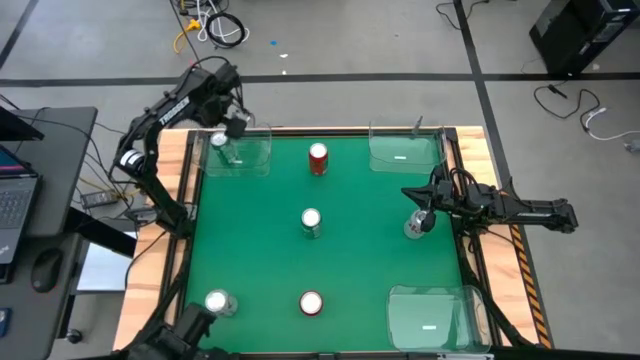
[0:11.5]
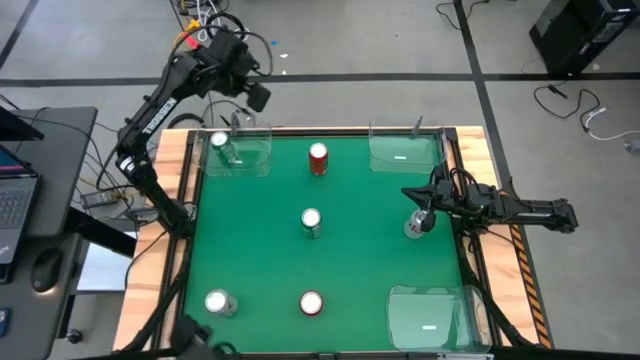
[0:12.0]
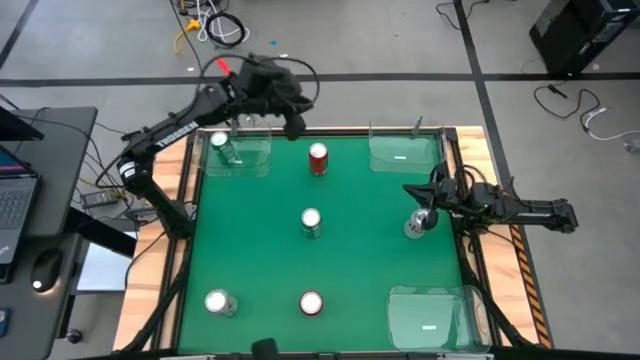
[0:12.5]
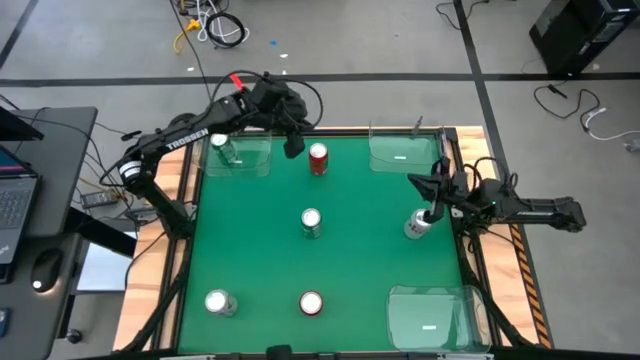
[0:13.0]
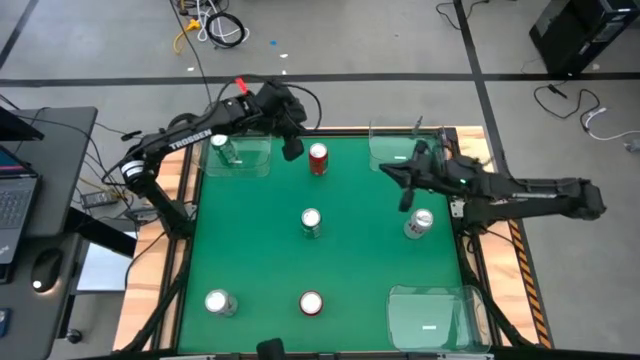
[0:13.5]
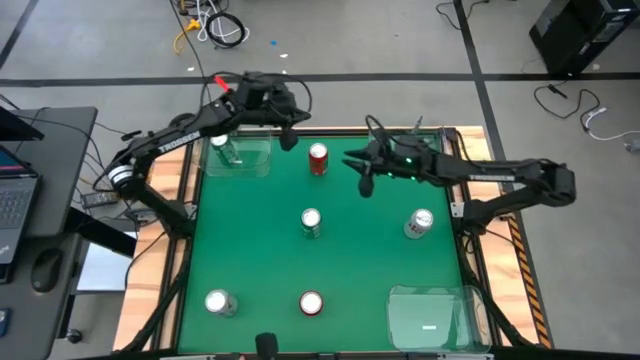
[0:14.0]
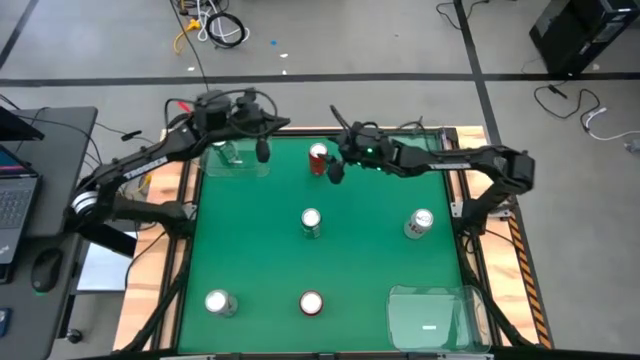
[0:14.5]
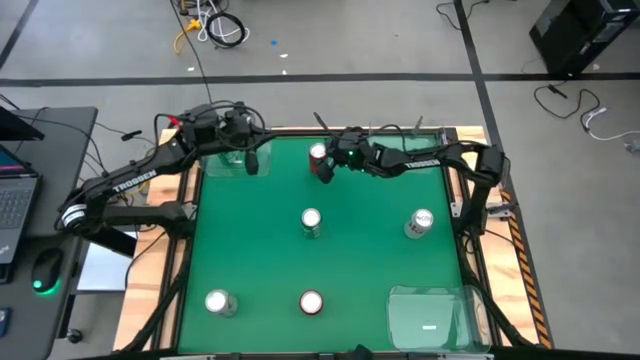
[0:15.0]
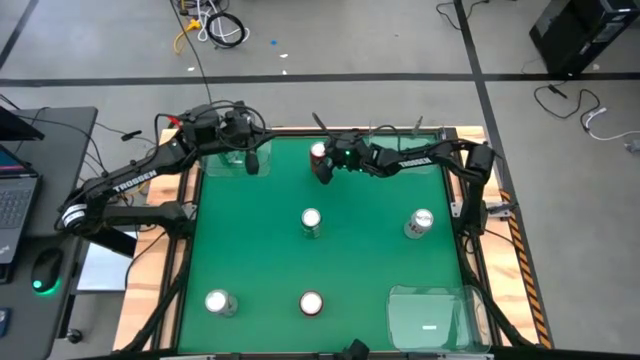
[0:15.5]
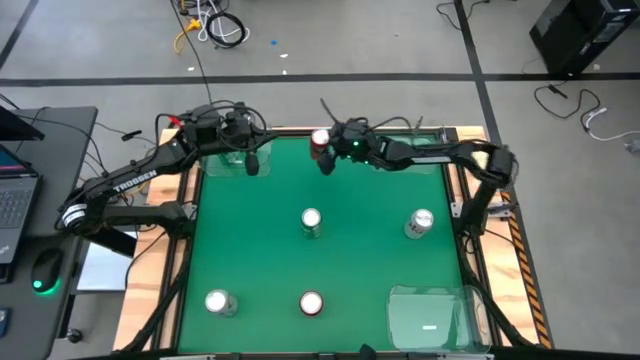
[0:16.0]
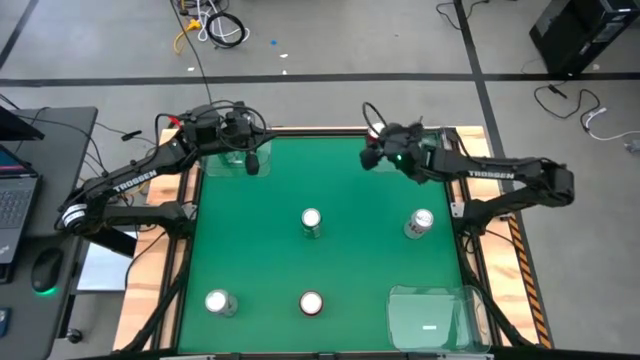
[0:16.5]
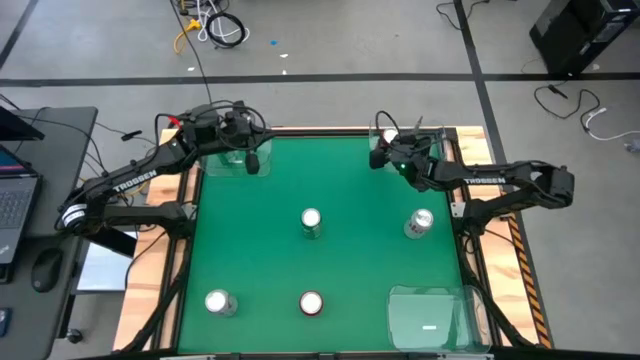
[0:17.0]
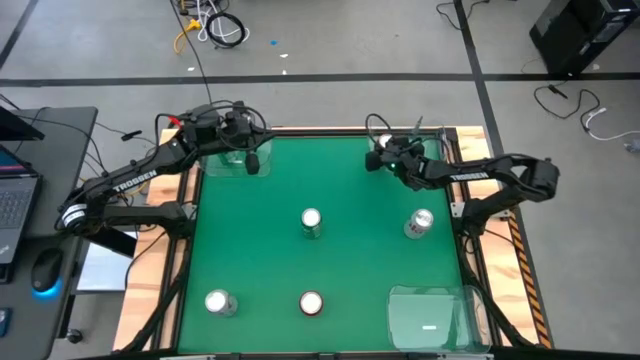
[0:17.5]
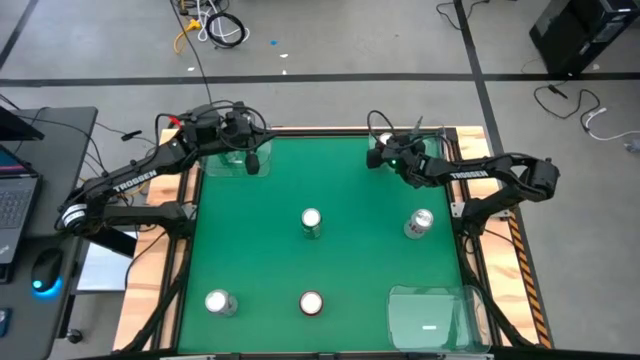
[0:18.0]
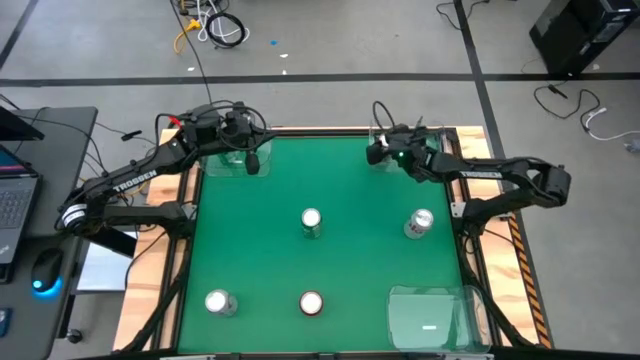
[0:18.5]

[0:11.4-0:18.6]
Task: Sort soda cans
Put the top red-black soda can into the top right transparent bin

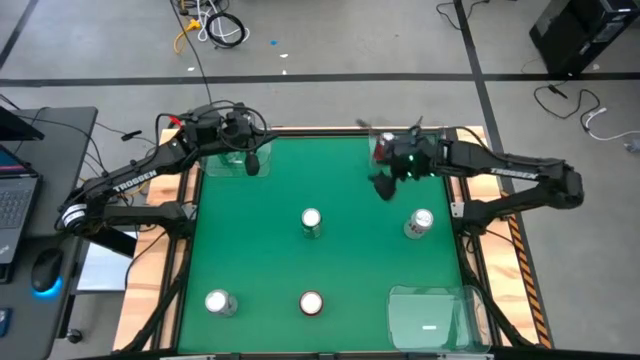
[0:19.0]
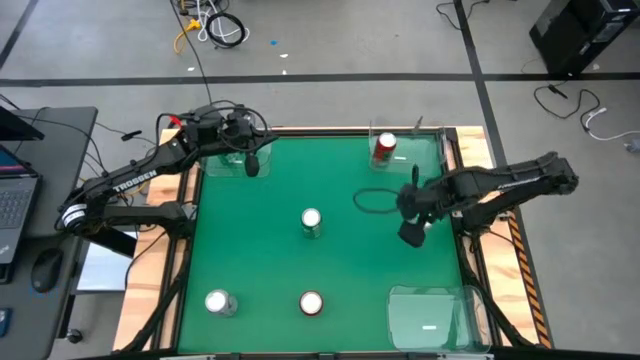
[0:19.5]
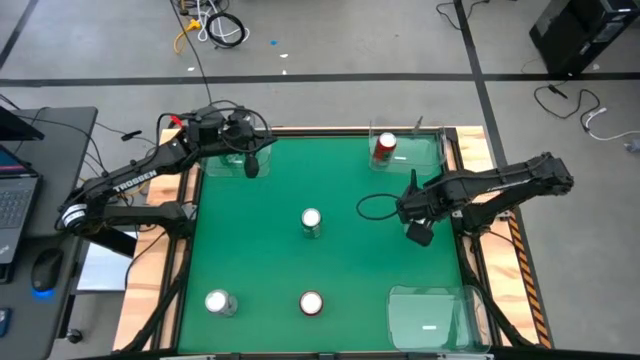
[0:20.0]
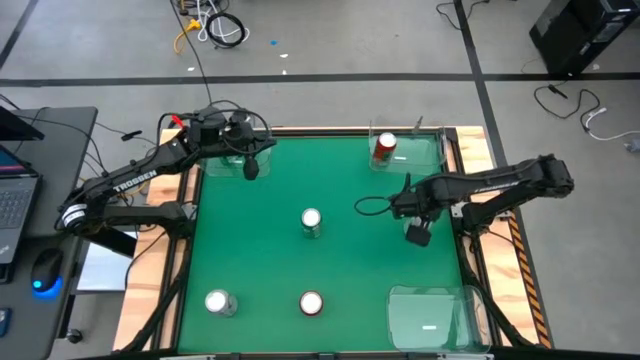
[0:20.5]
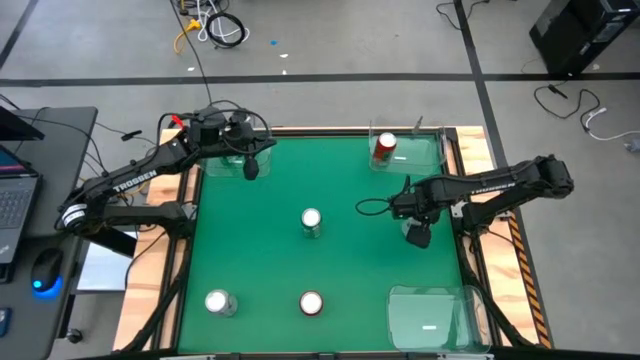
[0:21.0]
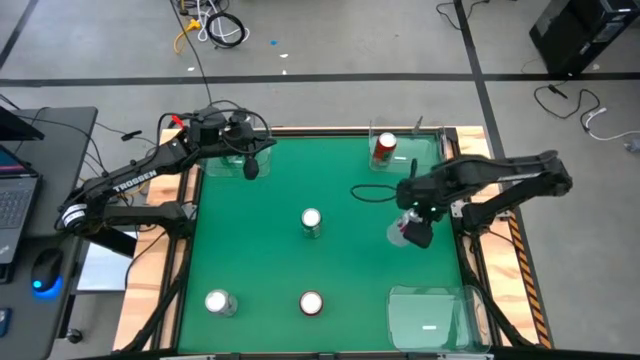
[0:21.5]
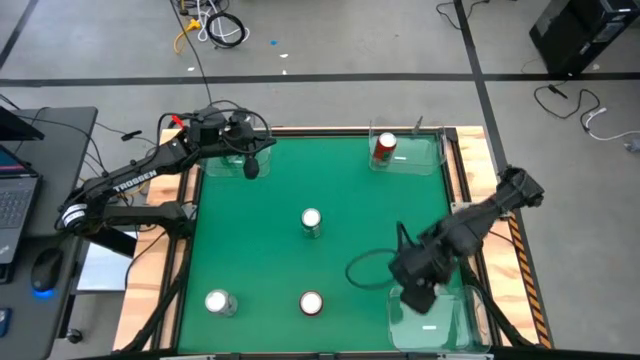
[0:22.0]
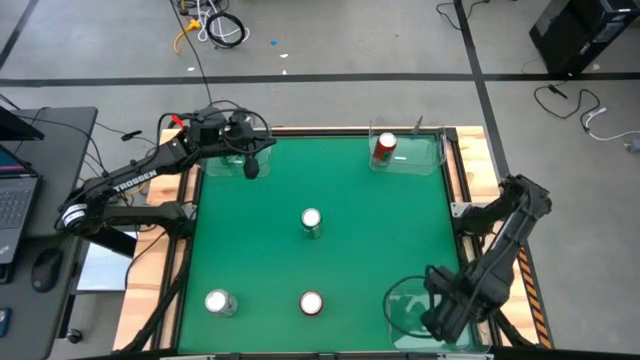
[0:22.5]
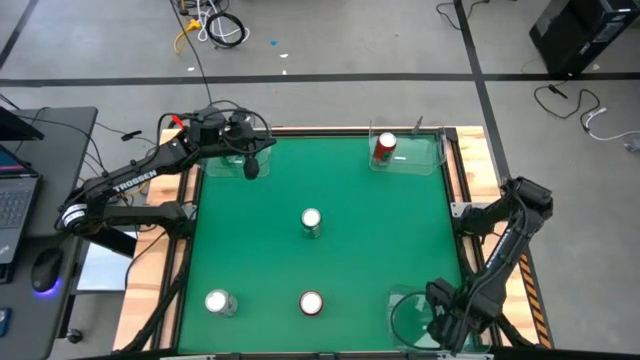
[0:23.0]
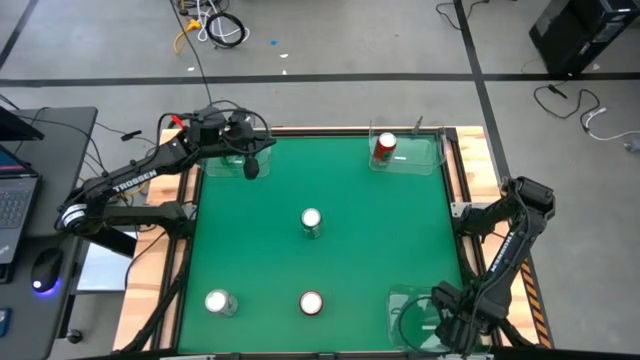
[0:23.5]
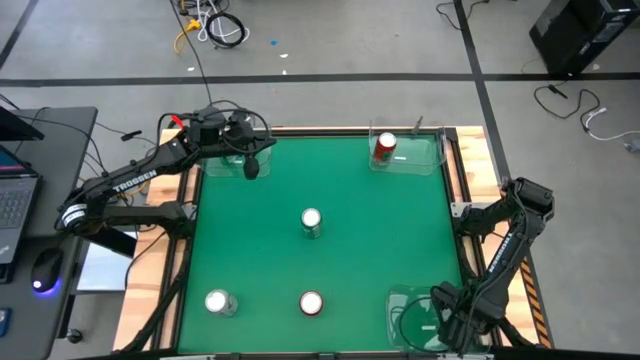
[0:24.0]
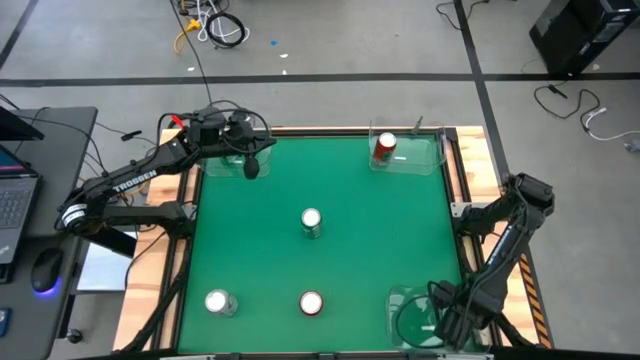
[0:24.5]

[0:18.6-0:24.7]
Put the right red-silver soda can into the bottom right transparent bin

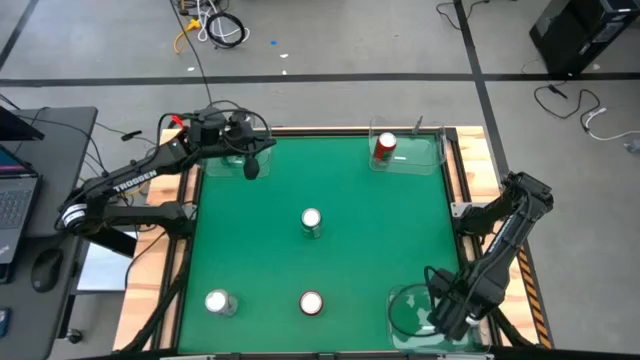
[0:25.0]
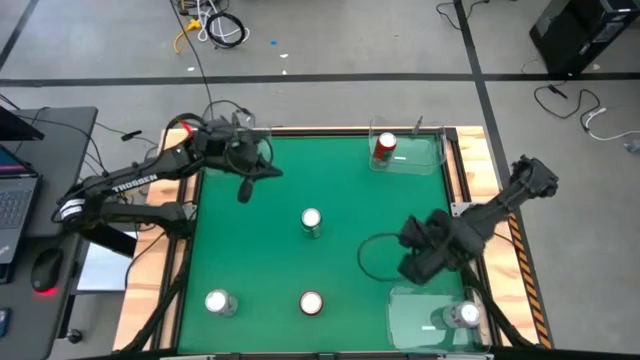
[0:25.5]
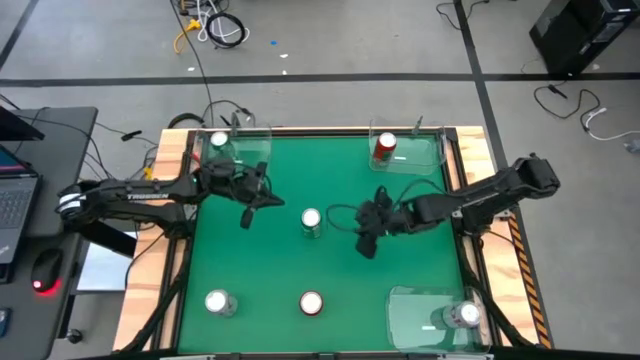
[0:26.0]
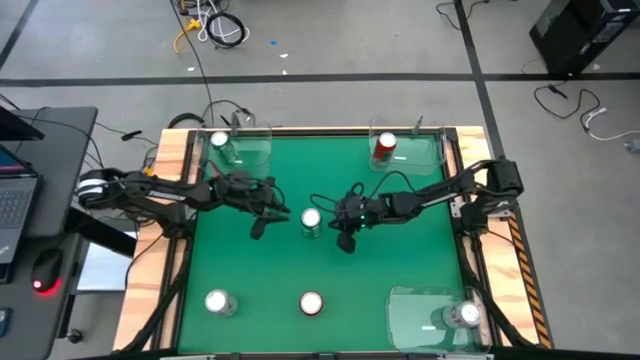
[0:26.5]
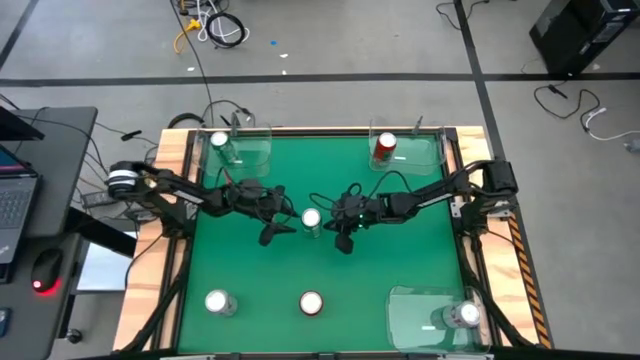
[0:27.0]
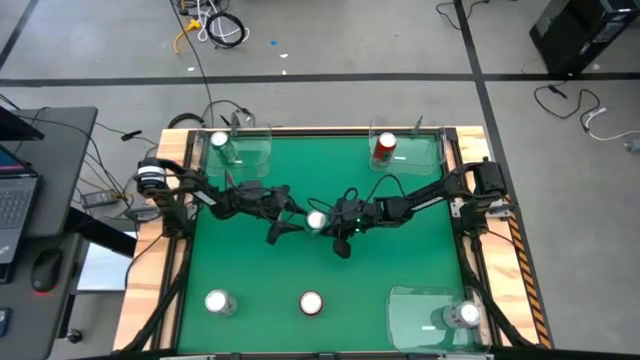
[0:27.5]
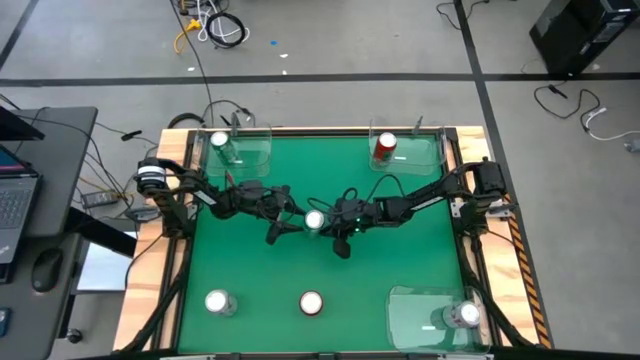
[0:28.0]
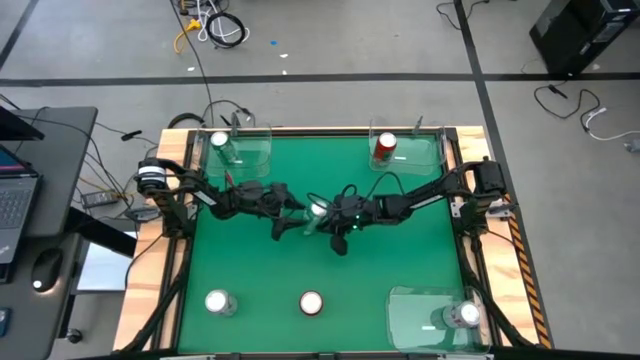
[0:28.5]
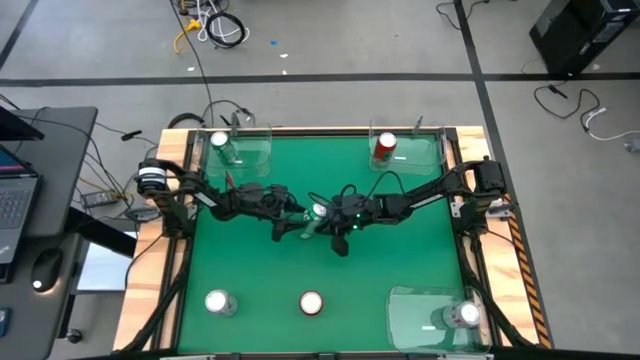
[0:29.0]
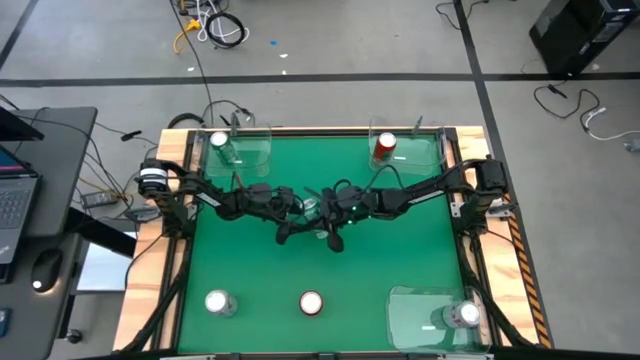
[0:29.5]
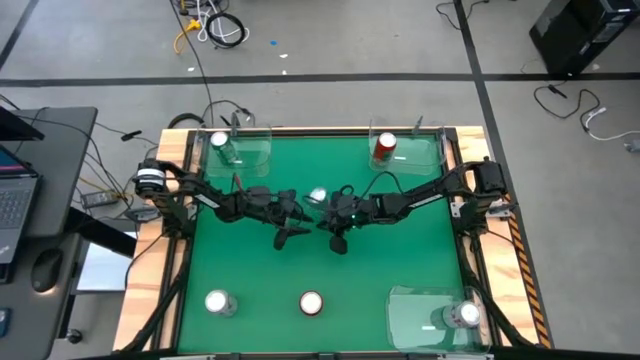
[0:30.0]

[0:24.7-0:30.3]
Put the green soda can into the top left transparent bin

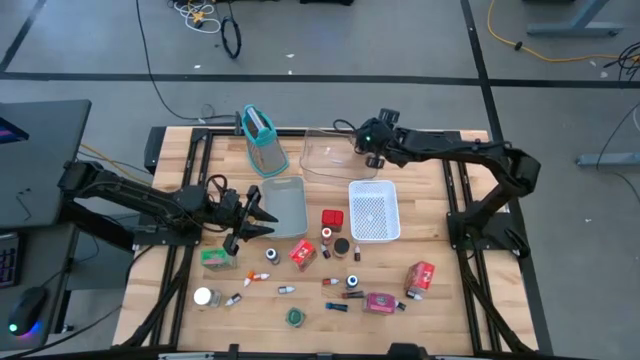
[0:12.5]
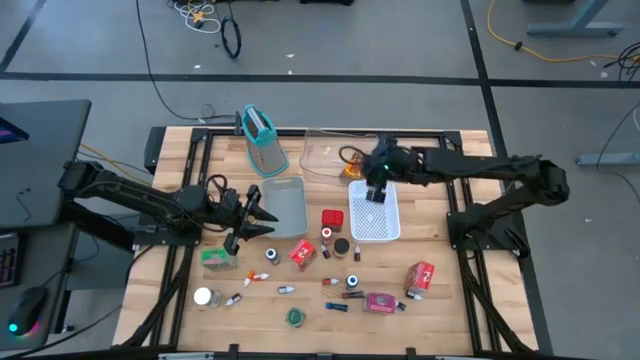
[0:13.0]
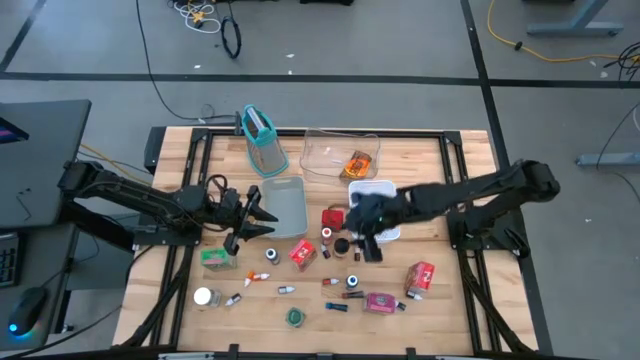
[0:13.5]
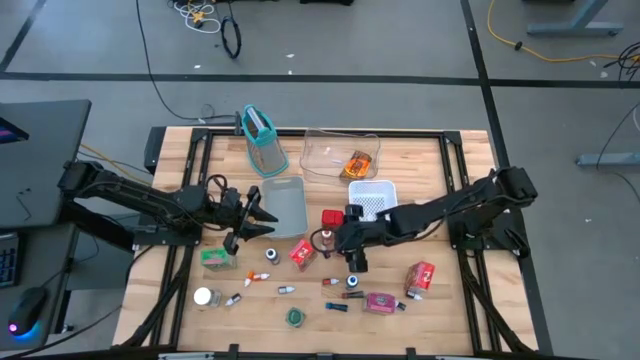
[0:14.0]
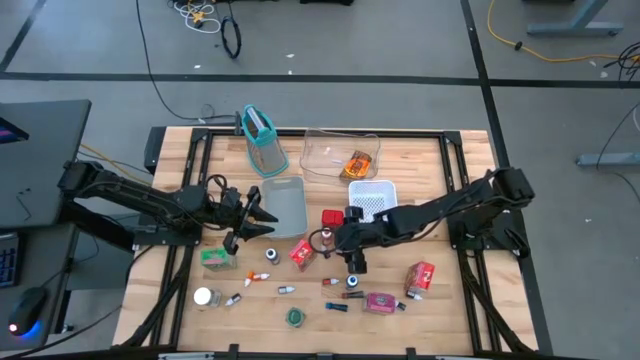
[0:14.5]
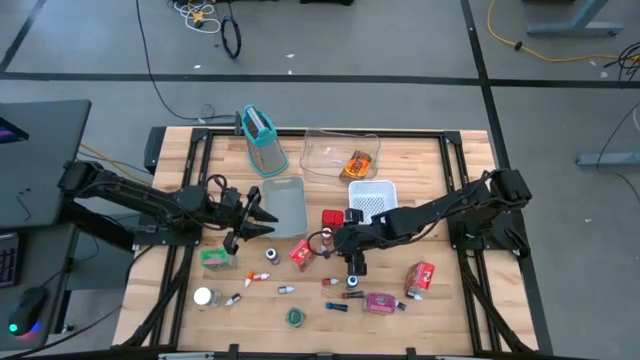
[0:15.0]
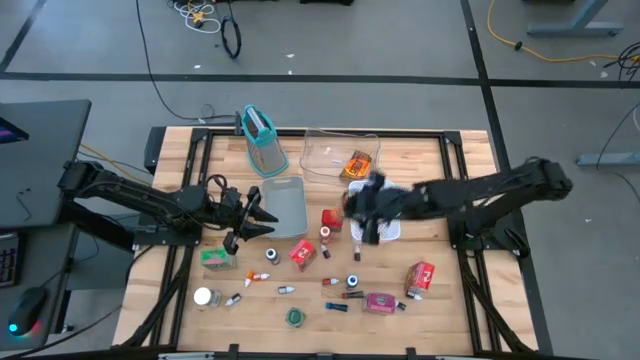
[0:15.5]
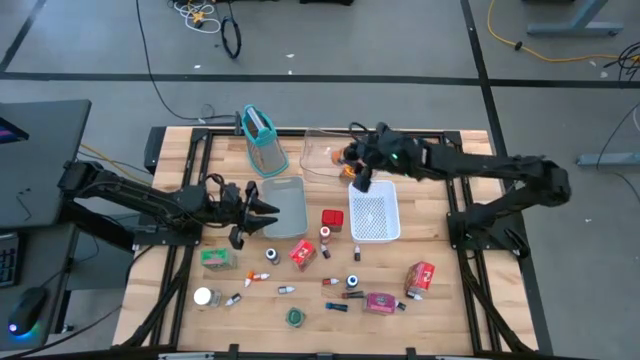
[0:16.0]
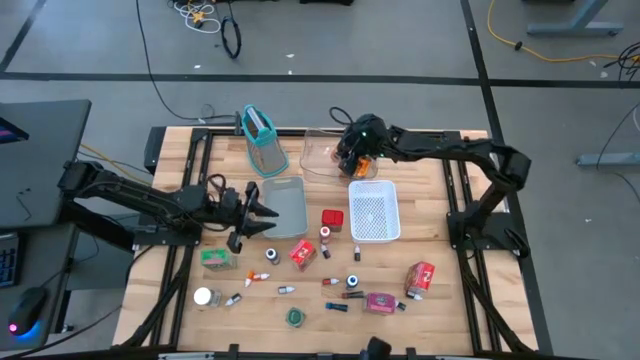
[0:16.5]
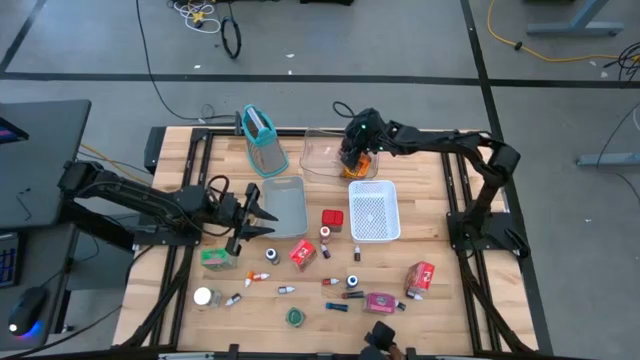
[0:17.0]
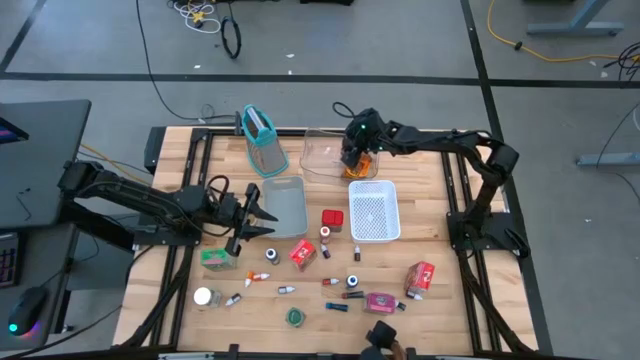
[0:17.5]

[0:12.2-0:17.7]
Task: Pick & Place Kitchen Items
Put the orange seasoning bottle into the transparent bin
